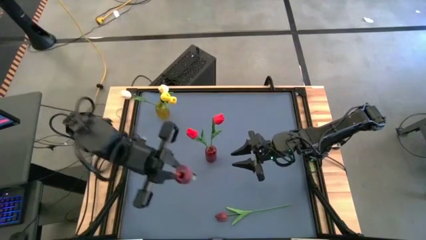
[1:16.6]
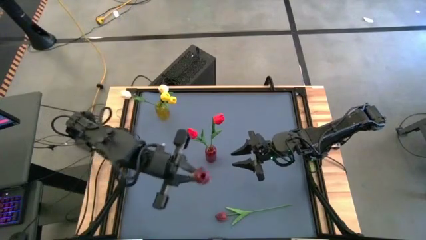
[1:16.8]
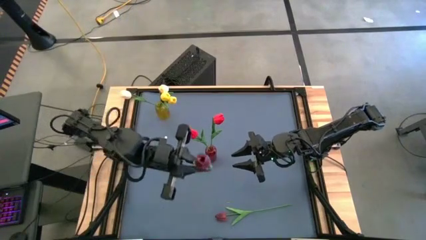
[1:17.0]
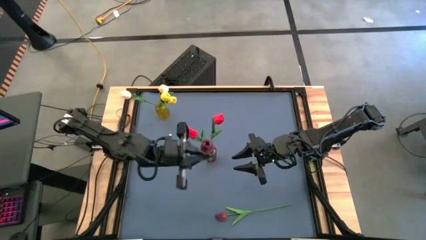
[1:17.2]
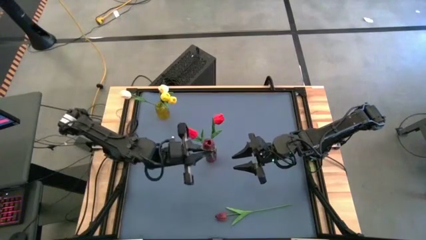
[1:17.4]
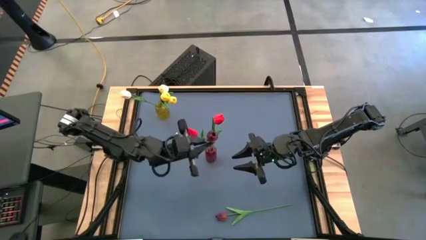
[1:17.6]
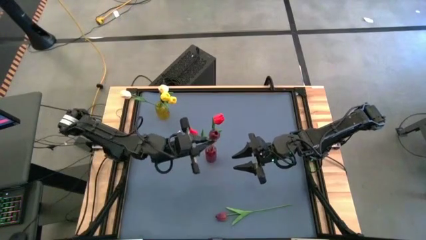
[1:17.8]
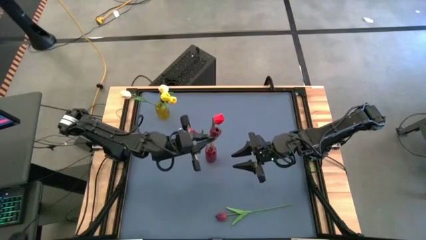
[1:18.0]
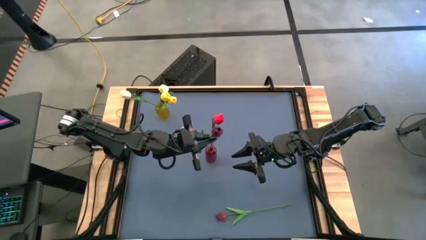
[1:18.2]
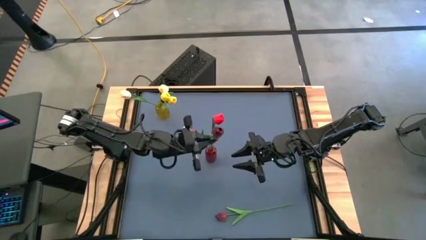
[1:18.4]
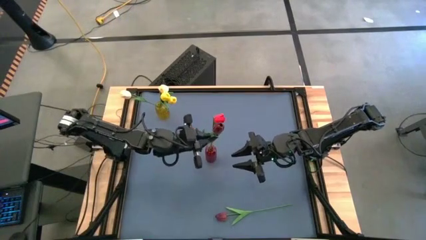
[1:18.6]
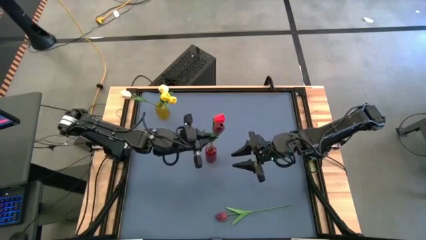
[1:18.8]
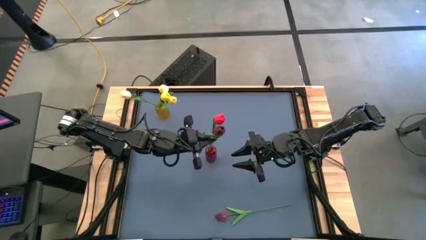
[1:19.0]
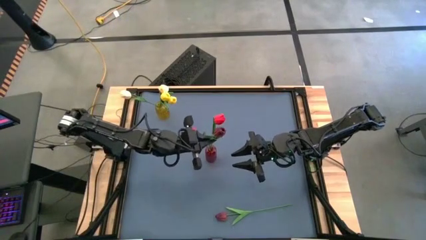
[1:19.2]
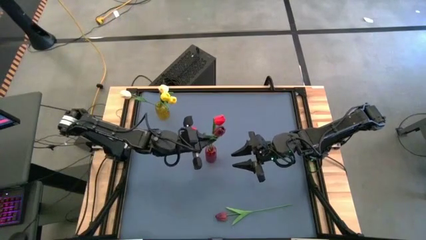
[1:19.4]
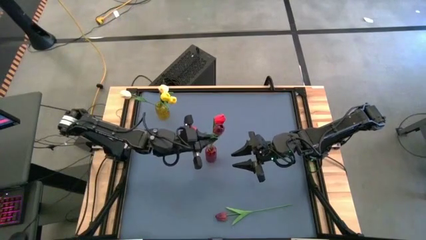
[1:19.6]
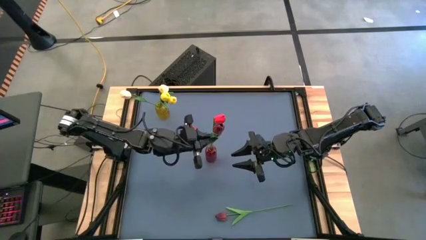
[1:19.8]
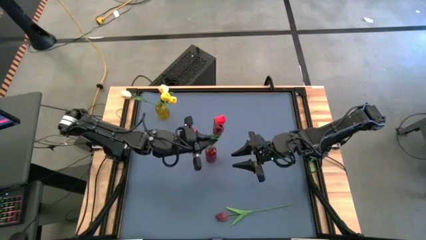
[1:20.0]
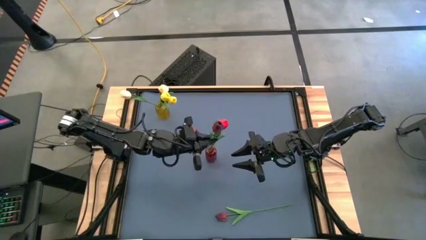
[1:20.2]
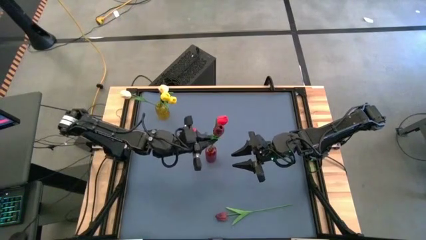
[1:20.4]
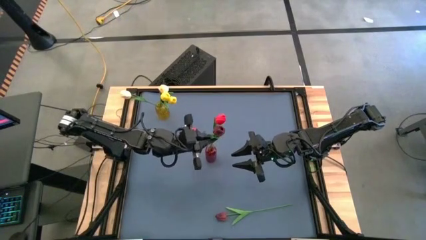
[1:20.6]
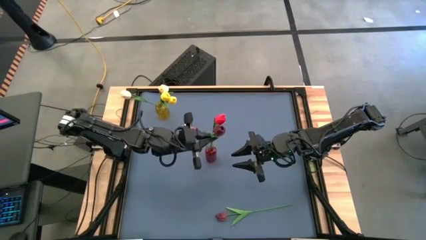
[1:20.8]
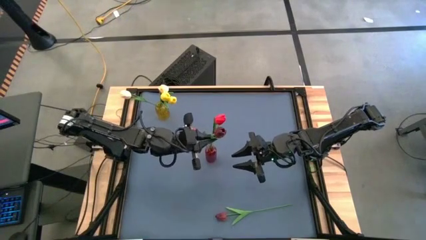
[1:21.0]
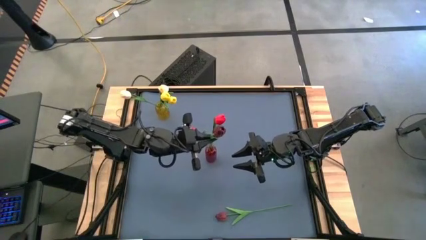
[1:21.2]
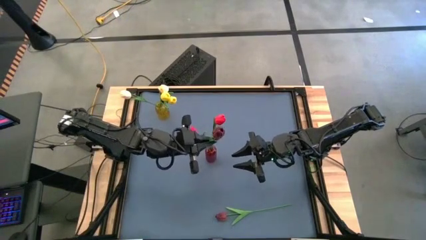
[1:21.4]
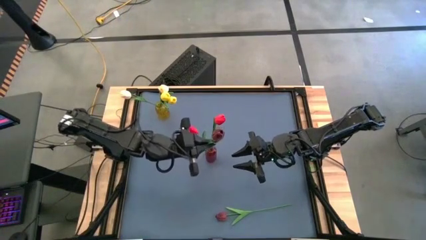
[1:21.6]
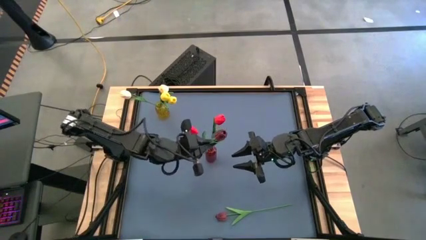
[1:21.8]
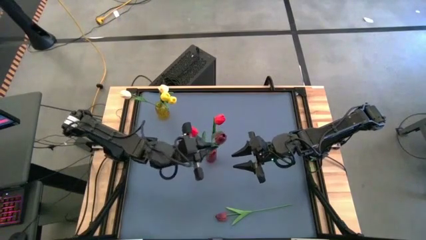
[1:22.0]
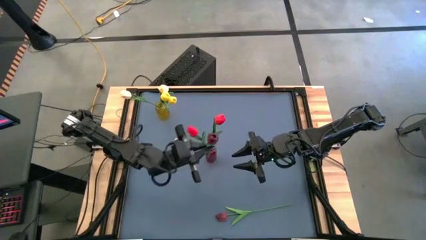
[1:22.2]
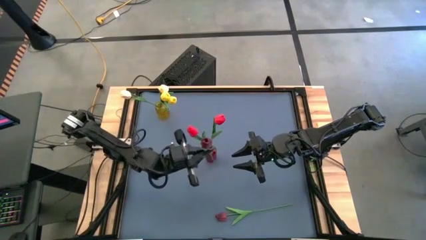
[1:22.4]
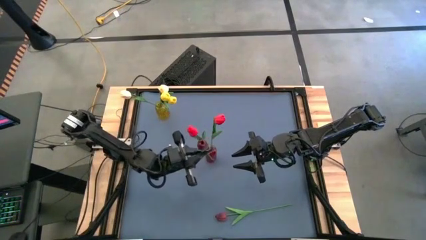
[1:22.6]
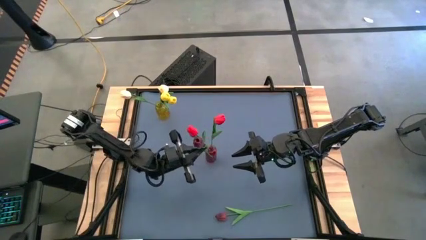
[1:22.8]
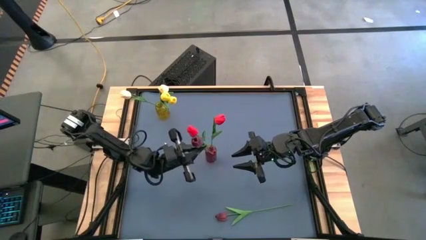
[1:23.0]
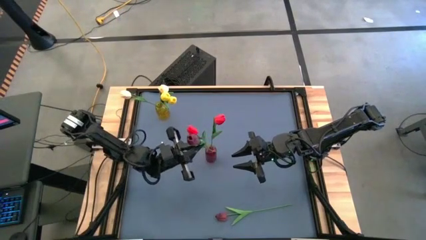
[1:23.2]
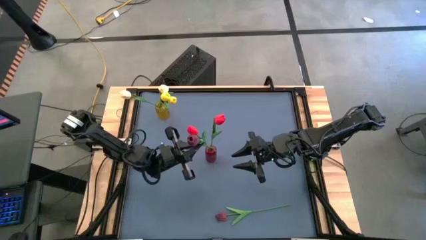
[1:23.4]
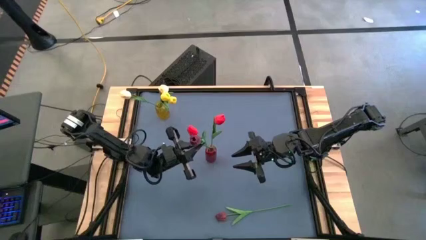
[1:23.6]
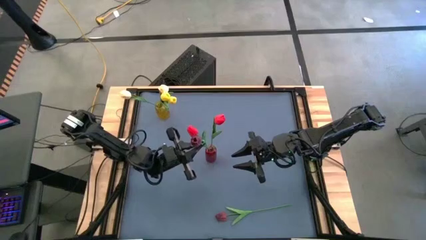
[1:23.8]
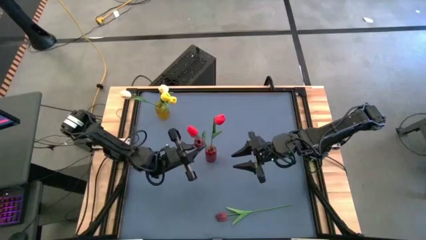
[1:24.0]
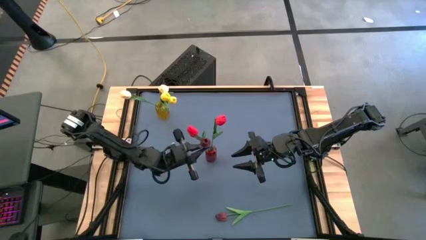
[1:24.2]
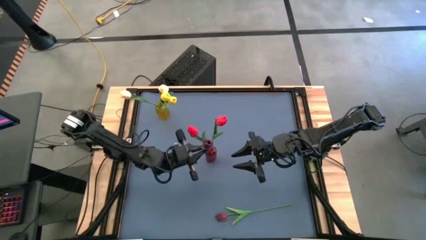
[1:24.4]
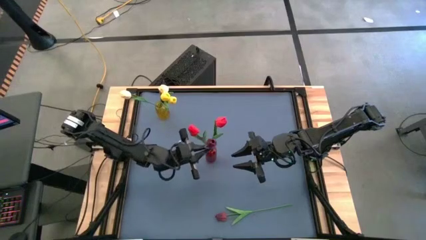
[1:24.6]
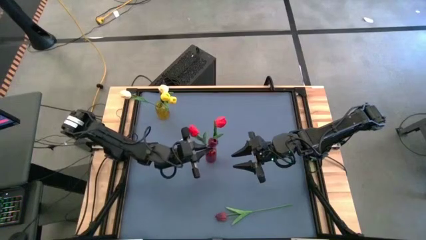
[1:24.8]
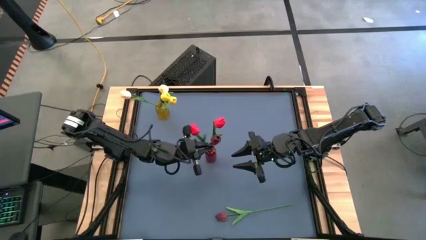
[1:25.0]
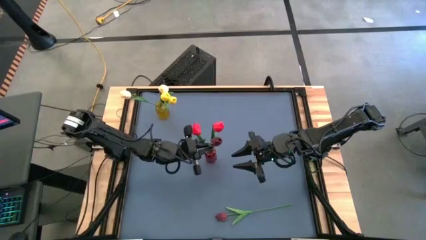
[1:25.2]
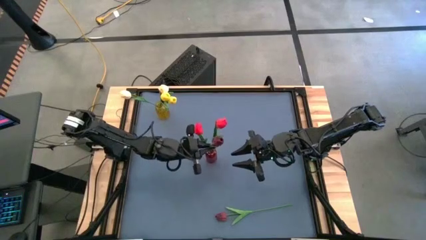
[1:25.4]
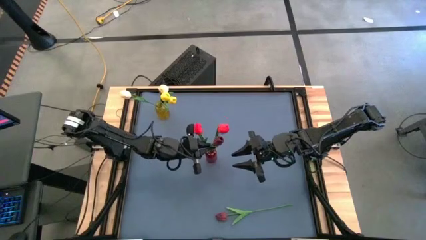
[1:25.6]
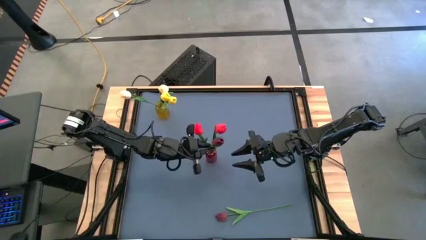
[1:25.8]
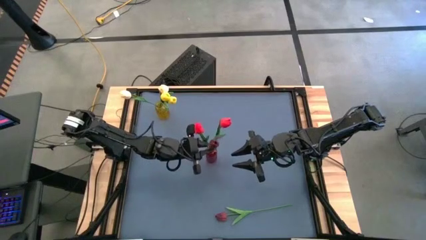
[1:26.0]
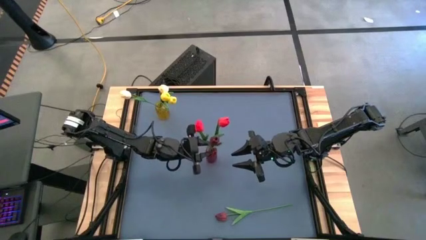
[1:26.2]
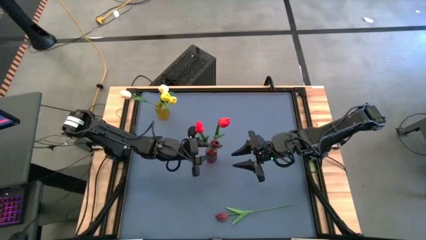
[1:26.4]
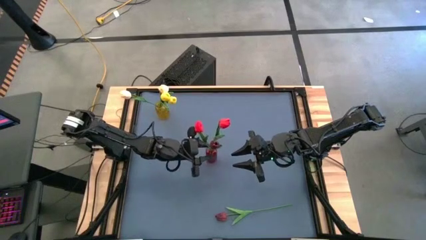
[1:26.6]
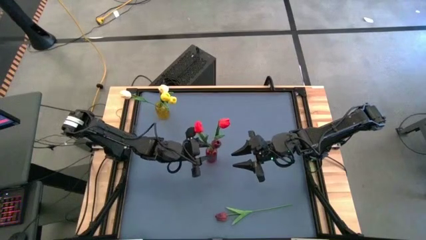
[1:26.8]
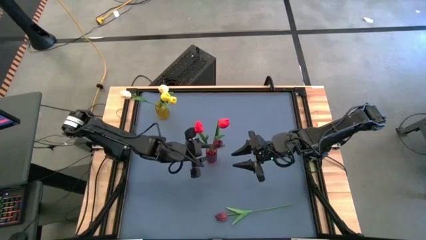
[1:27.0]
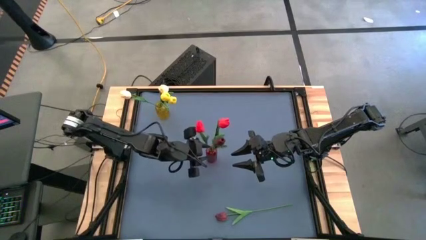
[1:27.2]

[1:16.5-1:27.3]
Task: Sort flowers into vase by color
Put the top red flower into the red vase

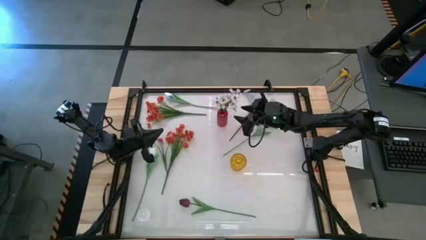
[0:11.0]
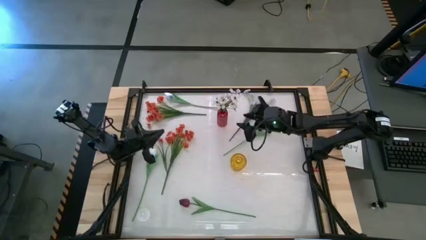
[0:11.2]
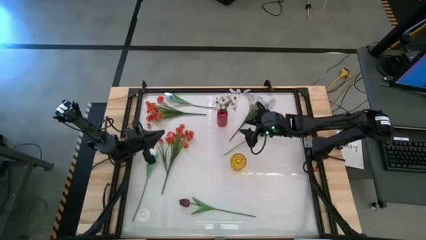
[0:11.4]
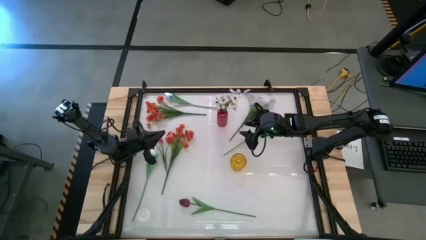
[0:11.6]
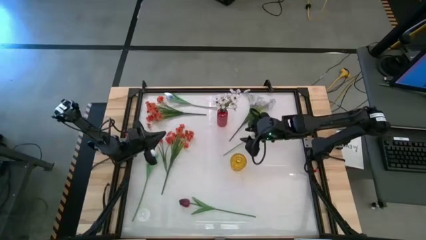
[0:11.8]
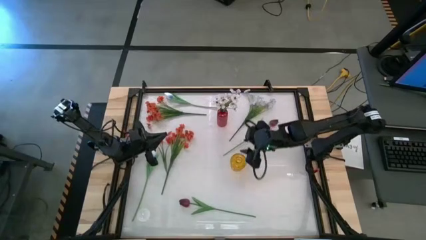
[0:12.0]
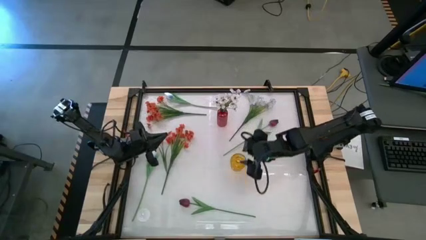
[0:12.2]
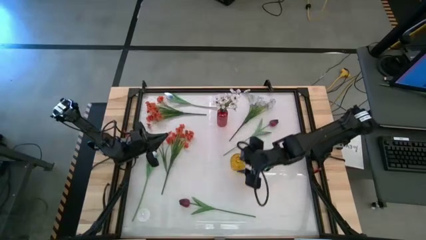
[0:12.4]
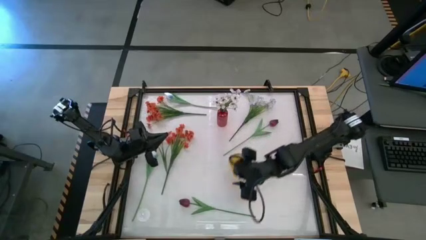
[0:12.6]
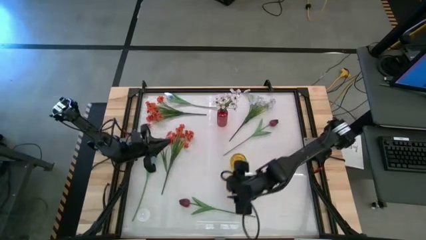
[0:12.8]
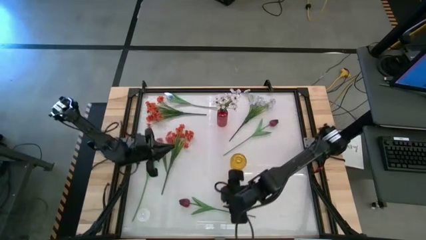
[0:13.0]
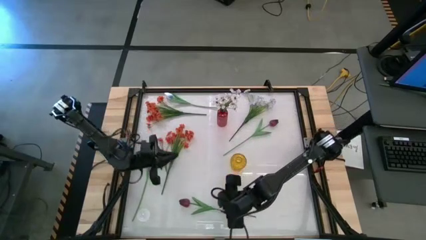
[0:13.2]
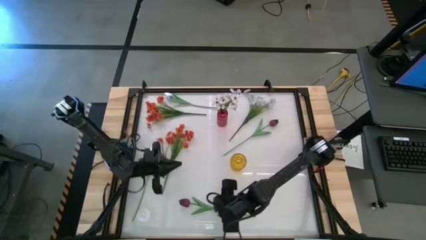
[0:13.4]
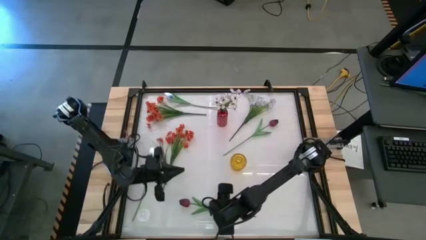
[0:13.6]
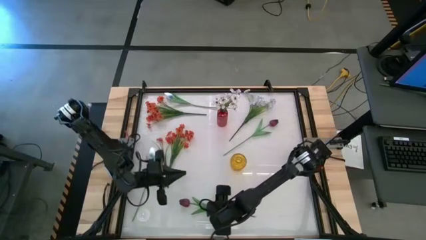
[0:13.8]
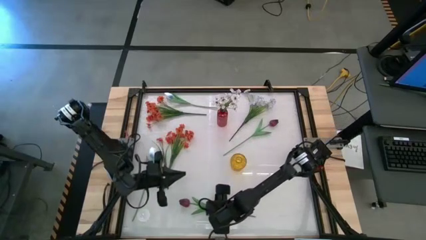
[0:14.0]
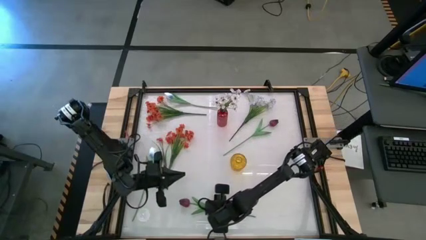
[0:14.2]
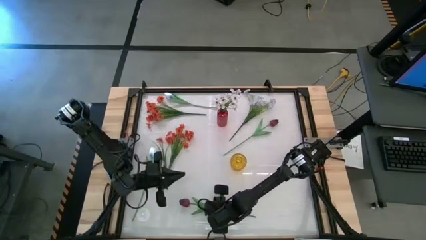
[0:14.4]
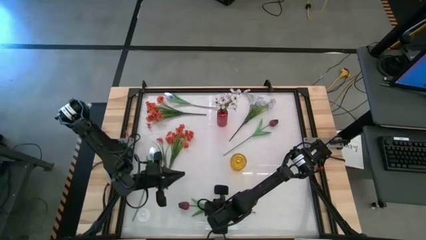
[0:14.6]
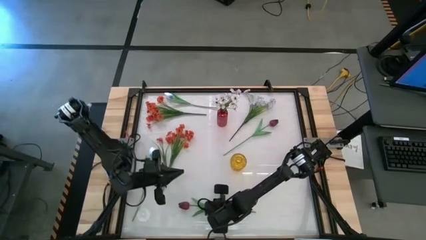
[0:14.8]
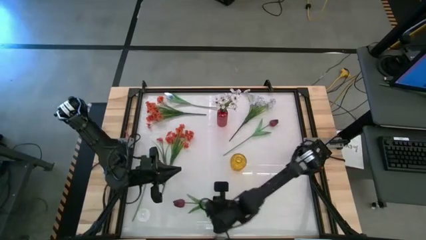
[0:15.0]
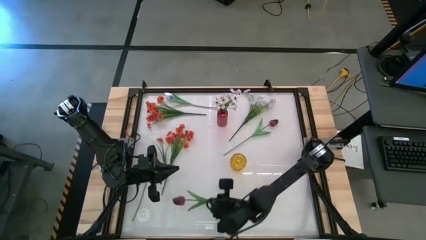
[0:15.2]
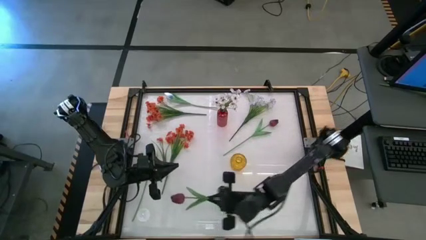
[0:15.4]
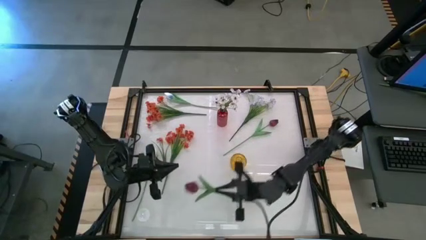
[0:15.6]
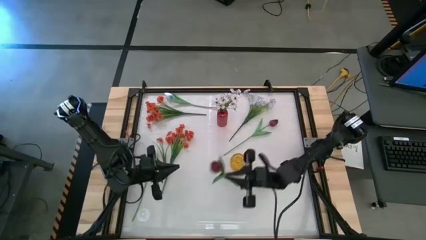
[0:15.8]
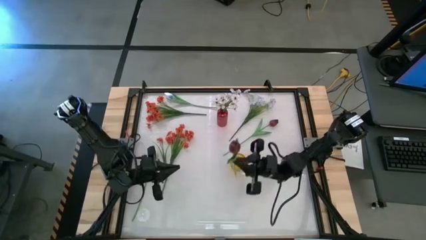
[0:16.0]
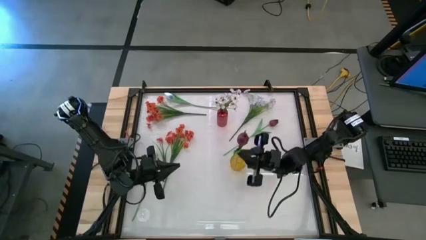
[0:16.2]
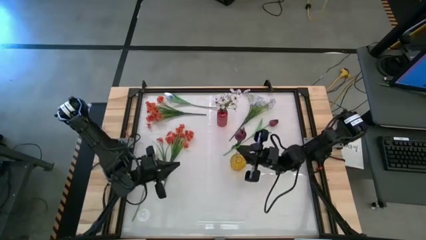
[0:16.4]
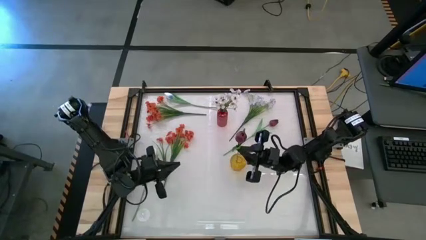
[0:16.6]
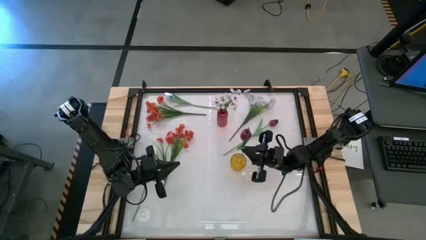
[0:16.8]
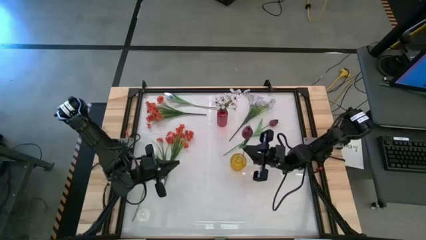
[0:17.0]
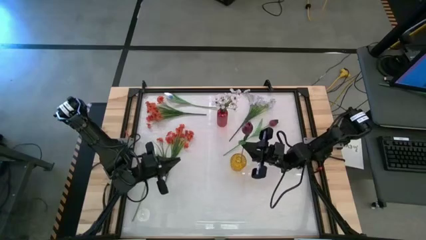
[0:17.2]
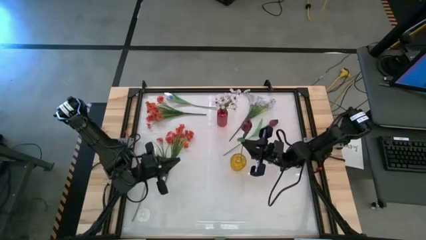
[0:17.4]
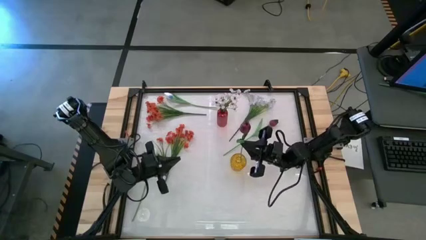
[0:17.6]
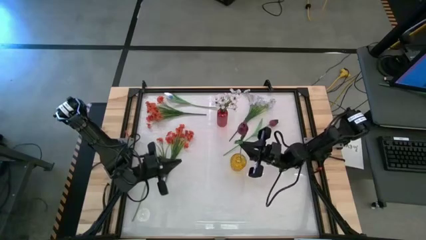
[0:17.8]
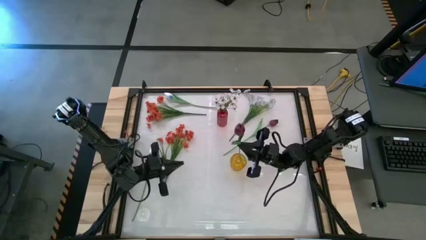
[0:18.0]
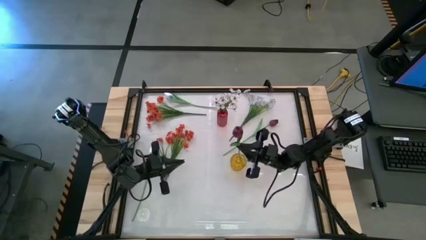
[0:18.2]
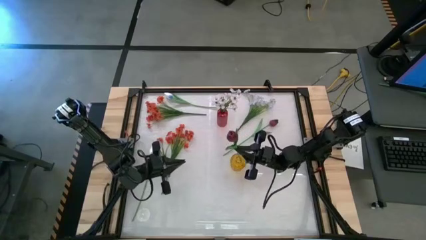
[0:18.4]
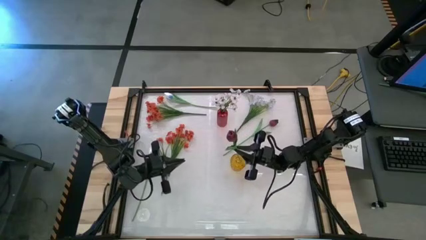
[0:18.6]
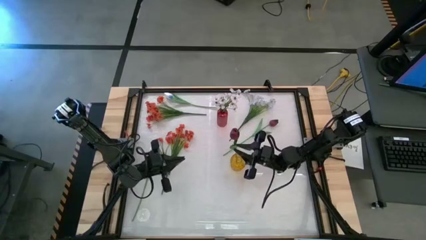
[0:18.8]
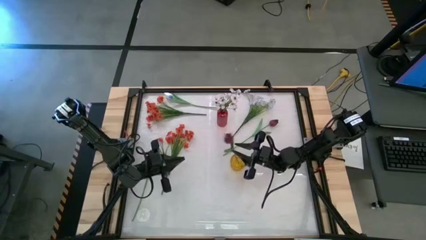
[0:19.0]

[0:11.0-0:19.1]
Task: Sort flowers into vase by color
Put the bottom red flower into the yellow vase
